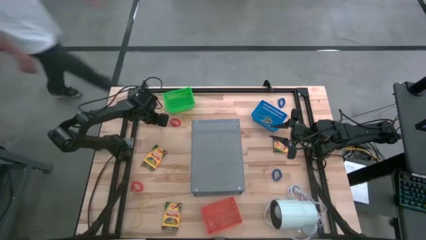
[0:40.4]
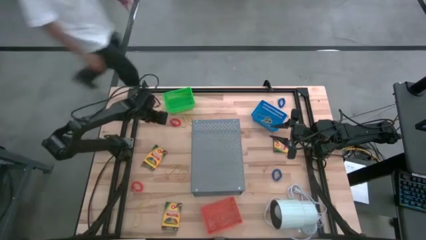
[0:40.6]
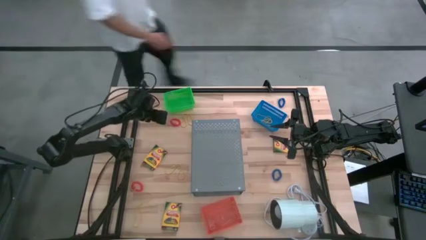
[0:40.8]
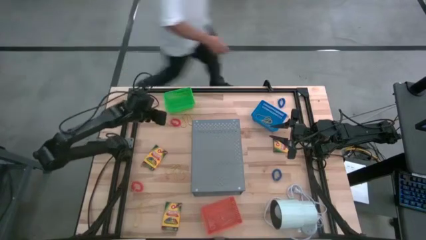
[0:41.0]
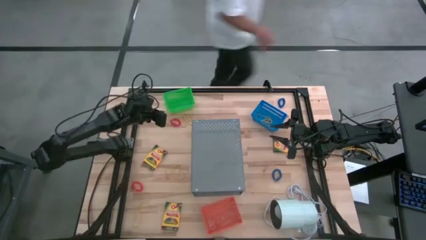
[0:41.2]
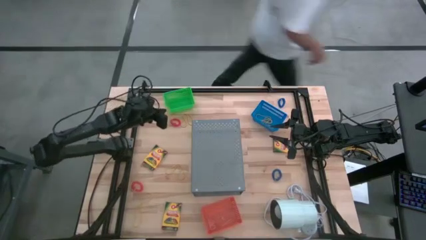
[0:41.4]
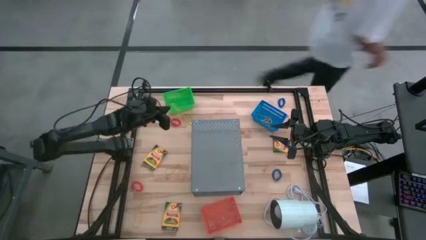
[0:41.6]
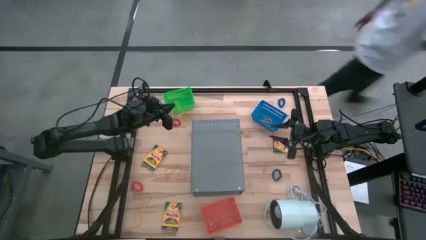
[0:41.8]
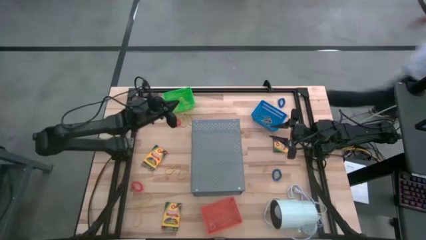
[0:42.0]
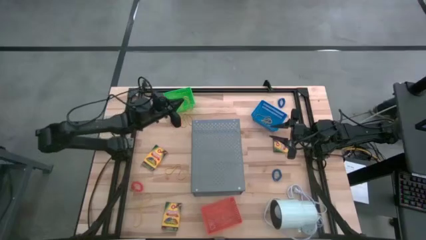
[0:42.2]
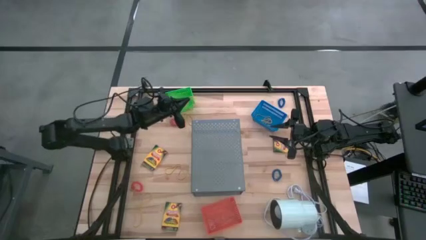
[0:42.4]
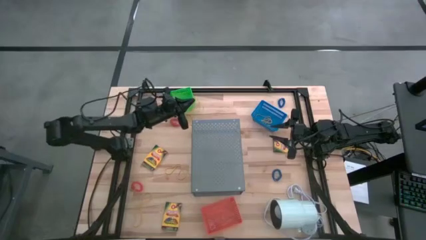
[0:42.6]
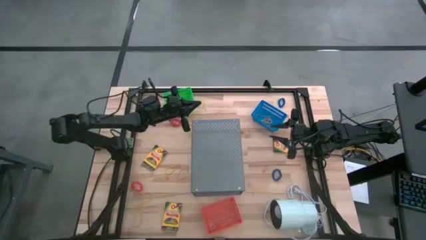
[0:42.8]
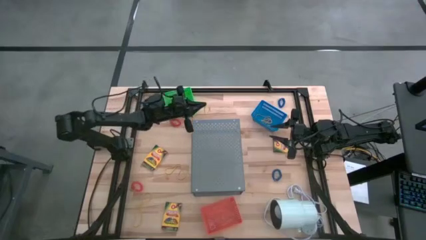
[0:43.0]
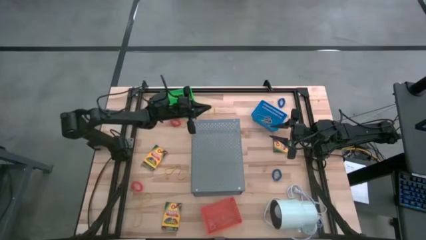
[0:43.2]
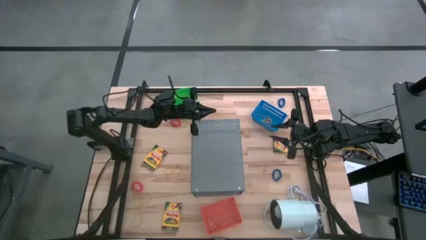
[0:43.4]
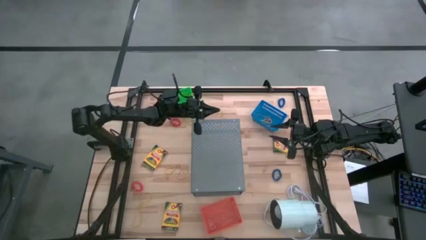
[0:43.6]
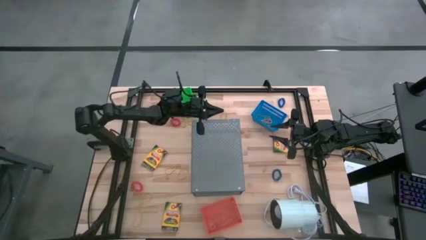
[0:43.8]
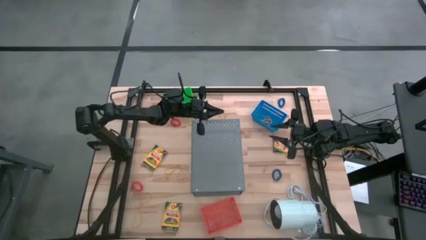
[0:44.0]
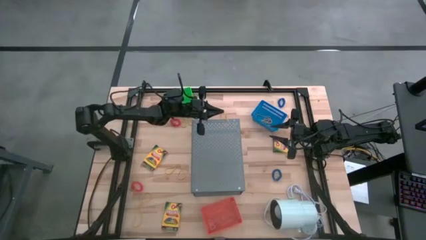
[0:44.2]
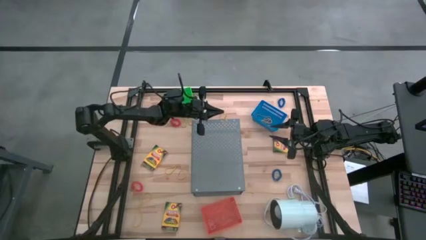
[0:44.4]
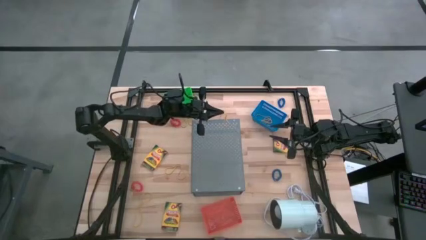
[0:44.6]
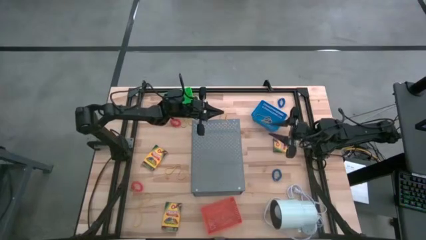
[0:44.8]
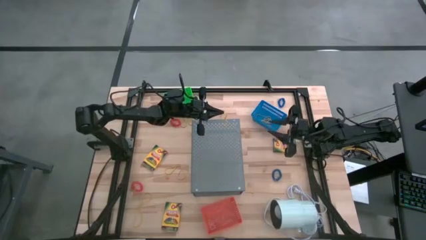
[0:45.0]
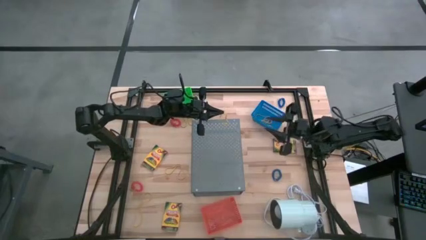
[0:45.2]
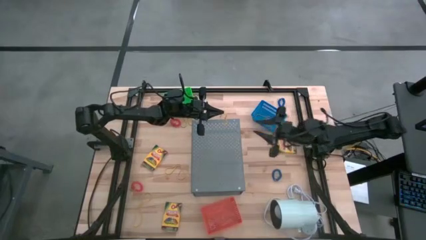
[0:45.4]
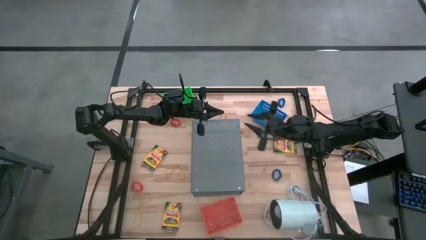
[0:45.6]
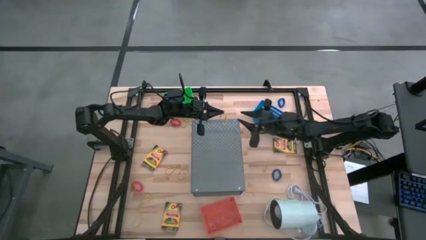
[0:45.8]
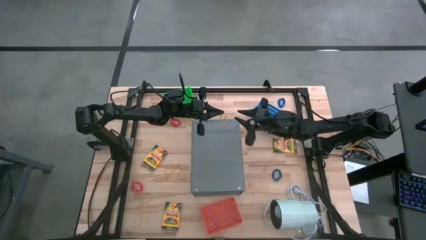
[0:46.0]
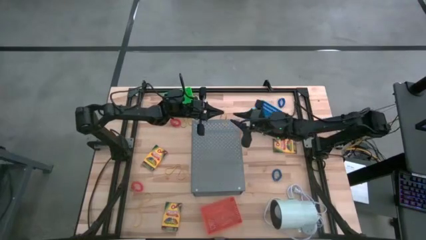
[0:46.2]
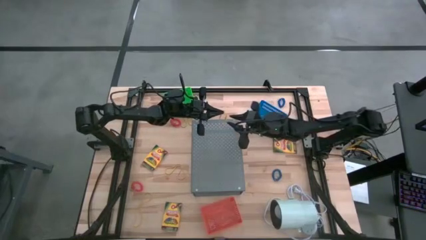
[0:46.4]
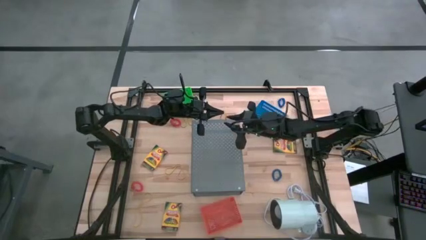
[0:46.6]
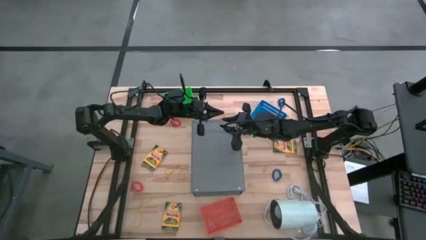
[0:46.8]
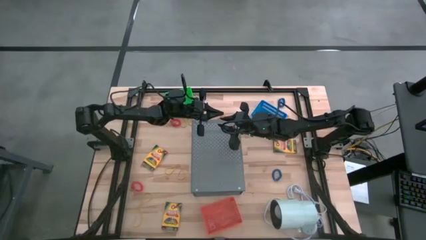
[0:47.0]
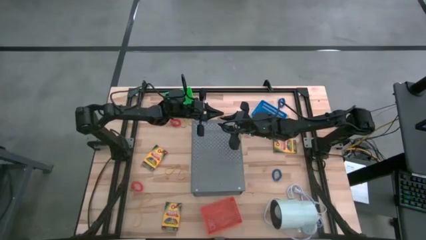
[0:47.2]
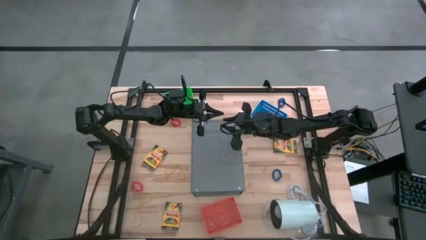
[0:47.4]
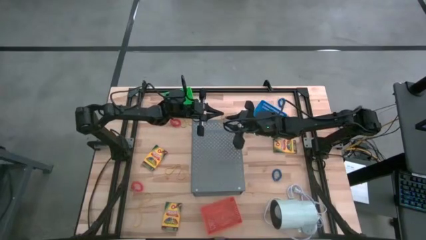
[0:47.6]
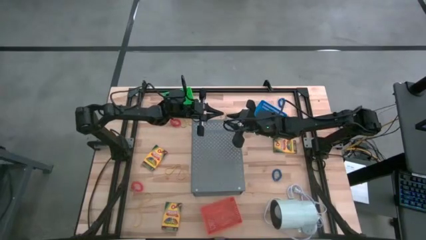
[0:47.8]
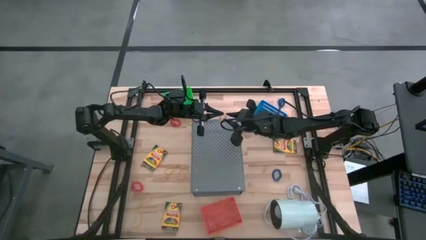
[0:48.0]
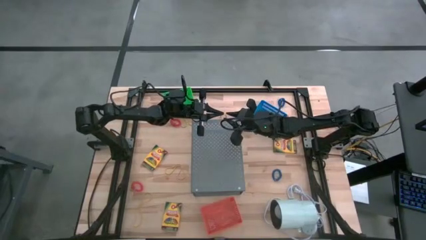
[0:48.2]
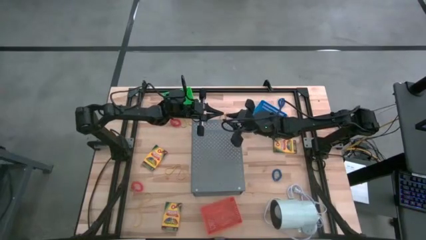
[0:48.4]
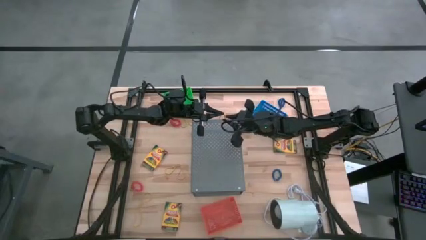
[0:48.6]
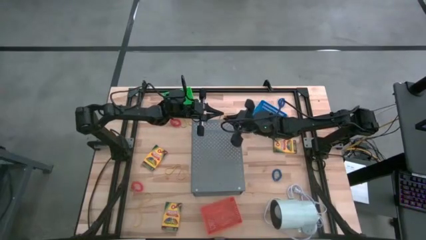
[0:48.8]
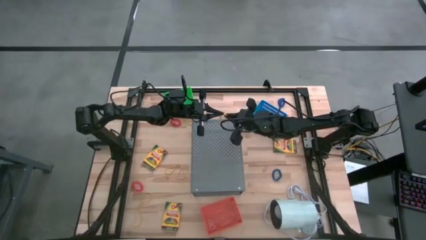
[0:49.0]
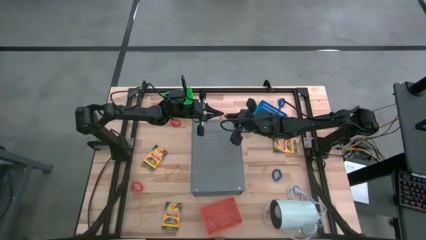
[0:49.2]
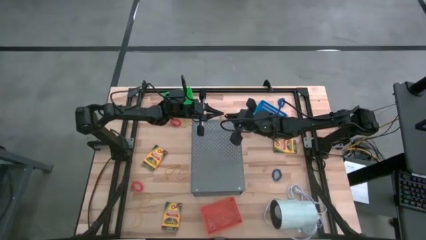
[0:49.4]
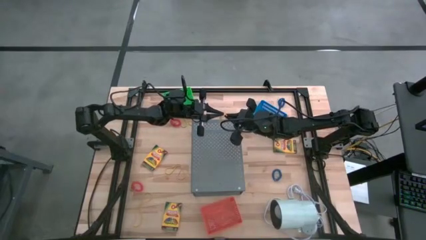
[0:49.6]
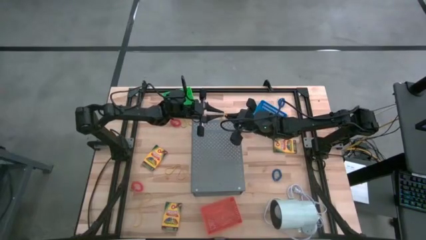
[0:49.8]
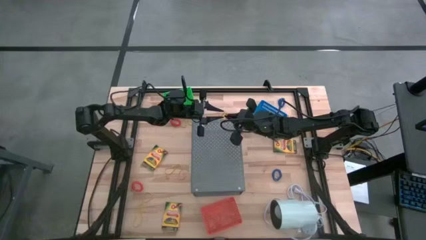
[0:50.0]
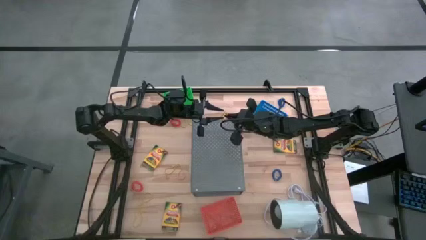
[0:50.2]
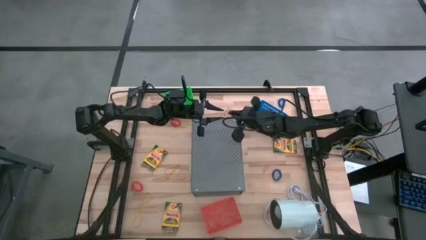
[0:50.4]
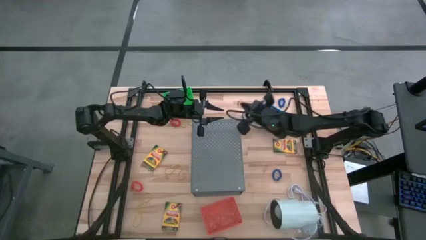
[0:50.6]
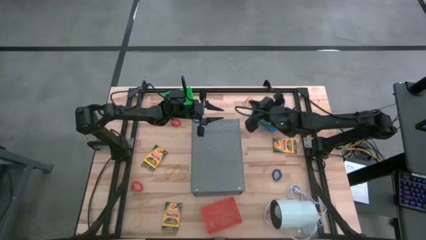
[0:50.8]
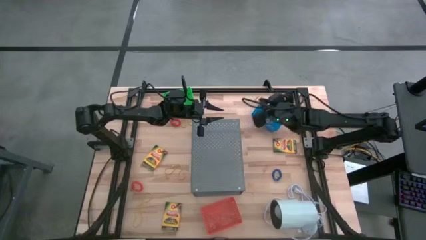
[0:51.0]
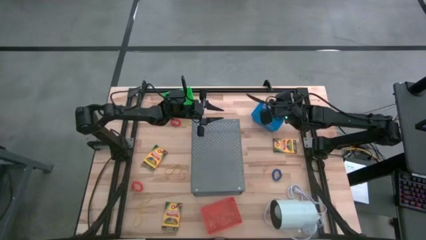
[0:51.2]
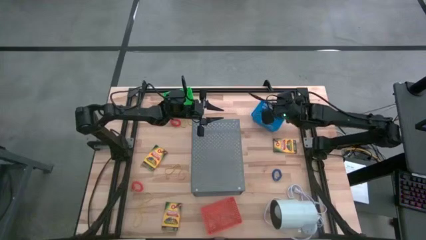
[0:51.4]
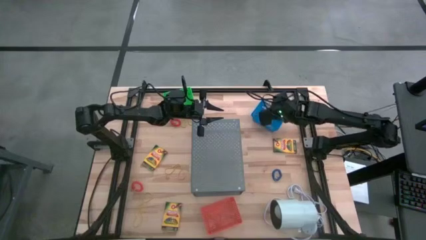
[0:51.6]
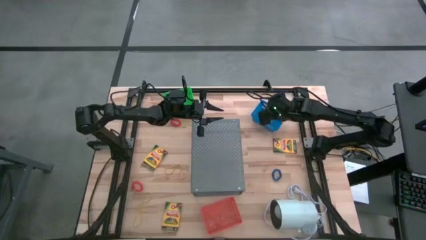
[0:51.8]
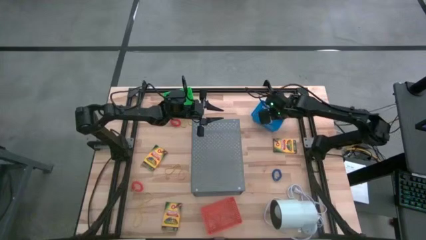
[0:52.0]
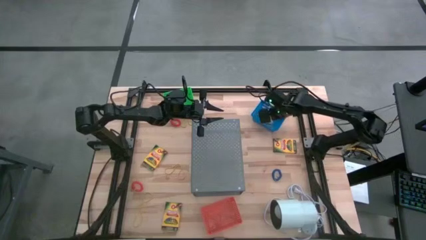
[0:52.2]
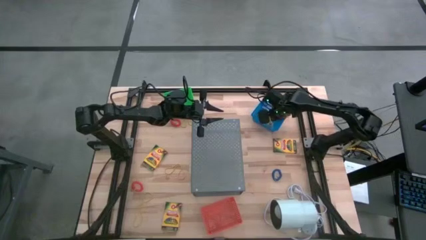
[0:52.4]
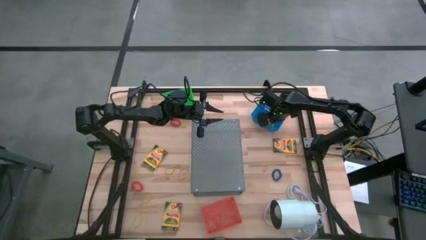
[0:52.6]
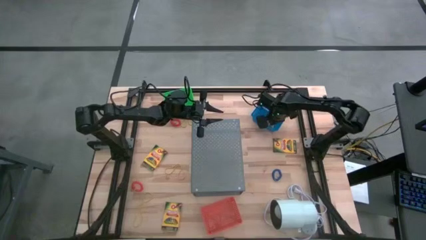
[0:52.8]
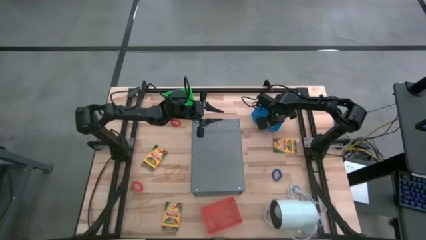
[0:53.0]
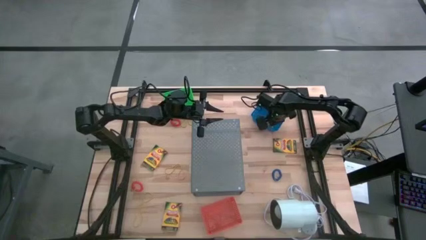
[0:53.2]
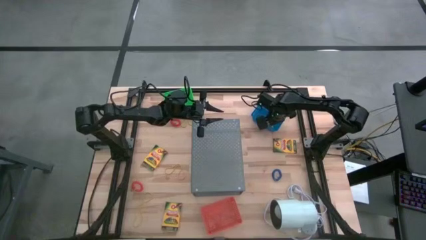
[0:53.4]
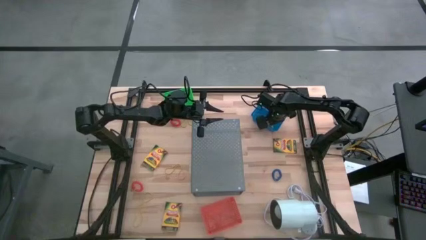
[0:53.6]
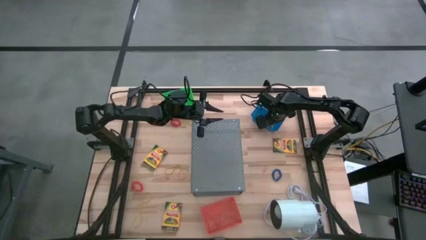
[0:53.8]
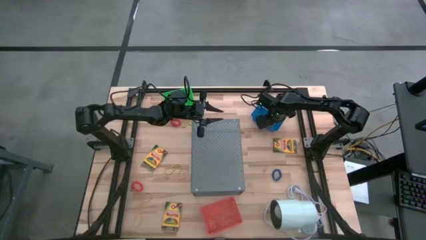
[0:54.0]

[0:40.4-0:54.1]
Task: Pick & Place Office Desk Supplies
Put the yellow rubber band into the blue basket

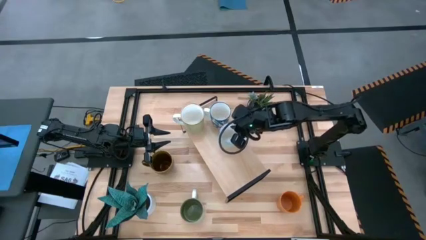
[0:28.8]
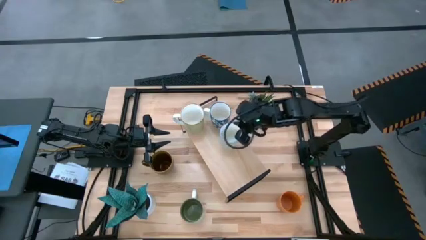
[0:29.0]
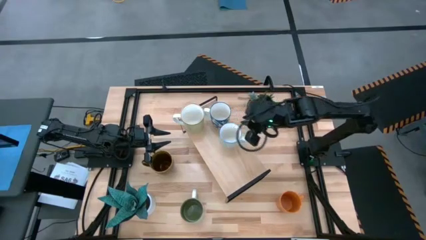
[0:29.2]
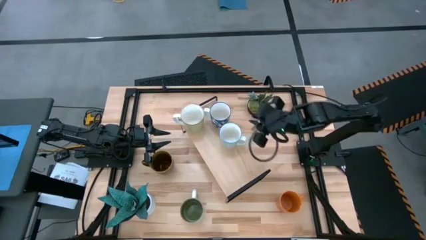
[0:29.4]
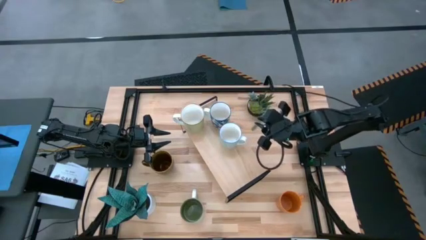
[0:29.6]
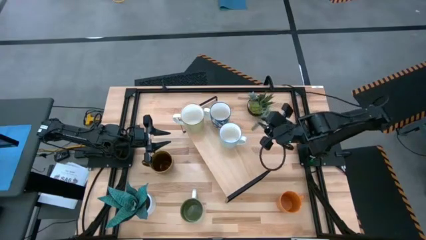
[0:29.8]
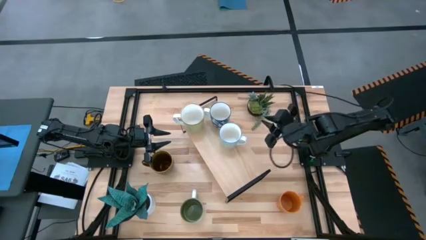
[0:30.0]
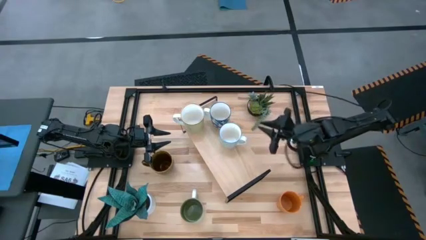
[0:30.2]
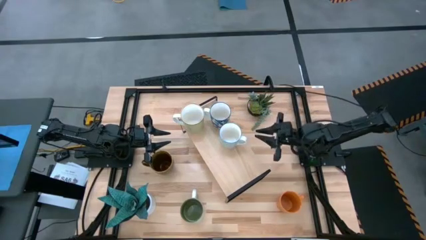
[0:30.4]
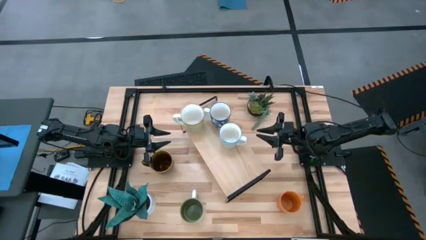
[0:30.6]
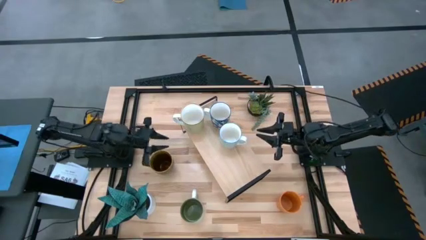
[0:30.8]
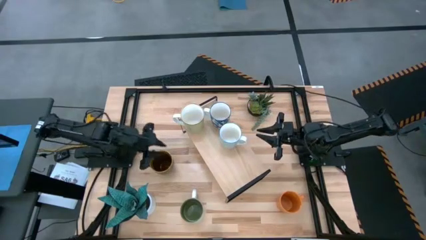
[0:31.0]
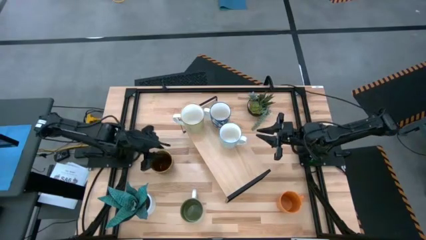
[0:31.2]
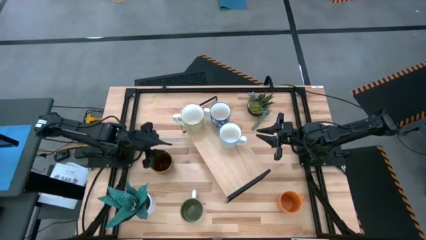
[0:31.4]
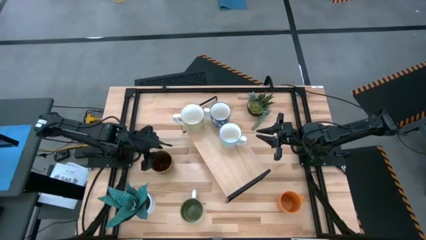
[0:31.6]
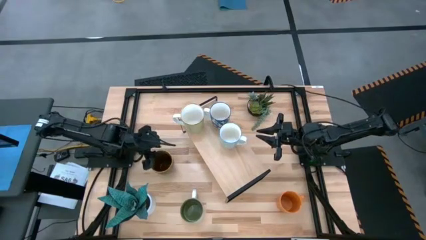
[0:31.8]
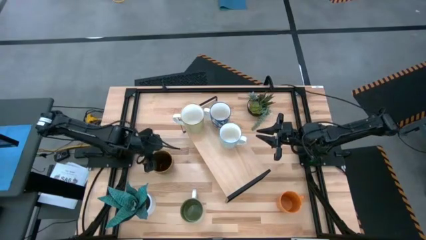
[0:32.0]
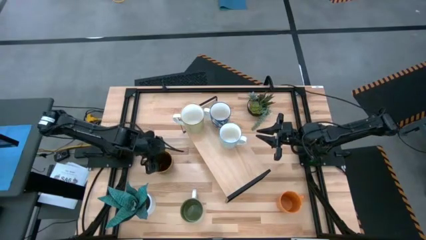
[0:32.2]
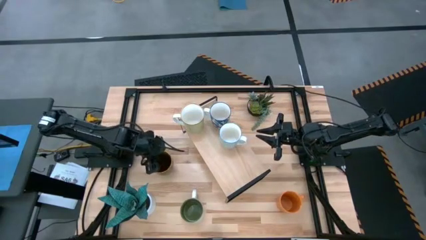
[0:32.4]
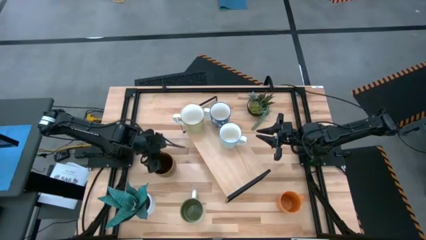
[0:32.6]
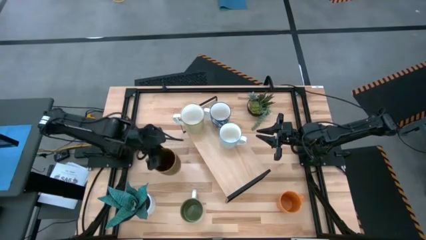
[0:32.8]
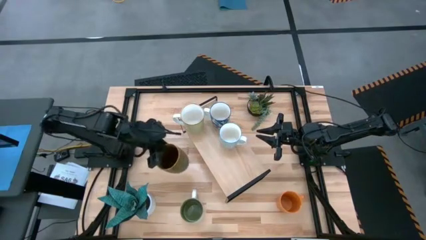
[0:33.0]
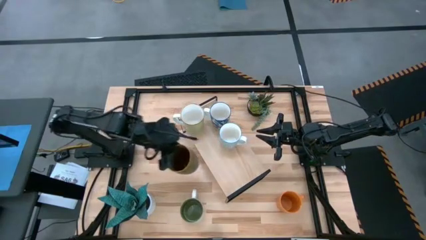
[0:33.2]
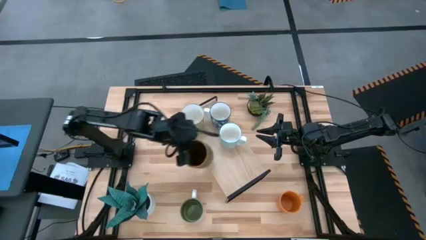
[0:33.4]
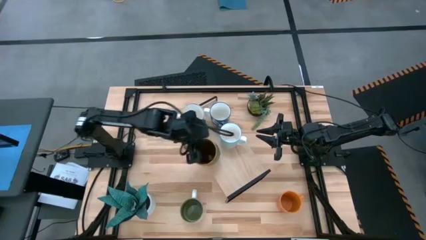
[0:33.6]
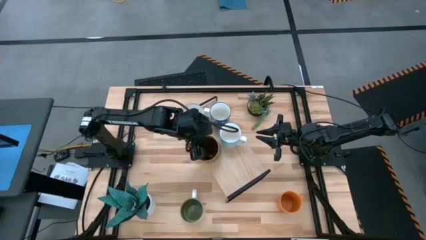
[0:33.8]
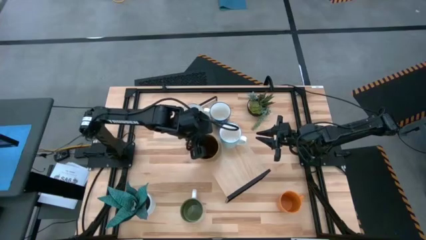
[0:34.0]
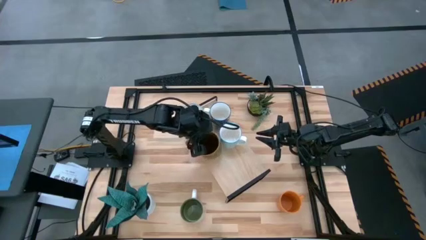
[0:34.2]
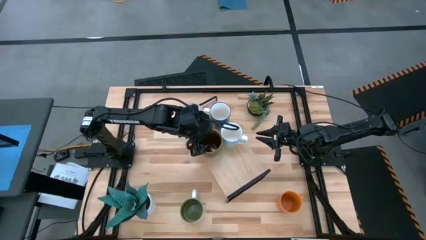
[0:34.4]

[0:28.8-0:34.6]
Task: Place coffee mugs
Put the green mug on the shelf
